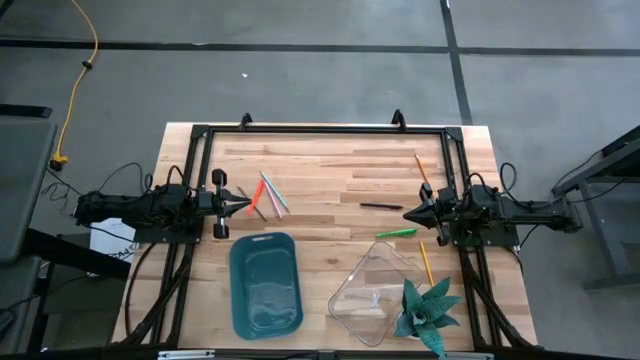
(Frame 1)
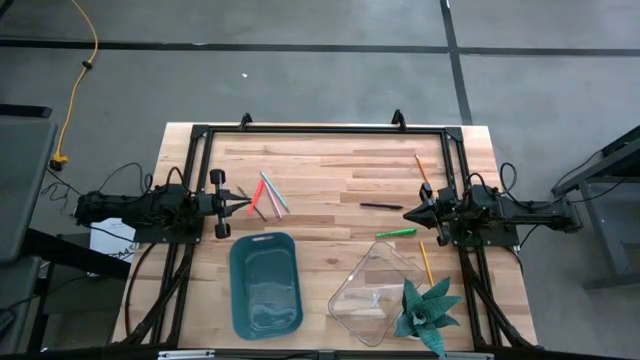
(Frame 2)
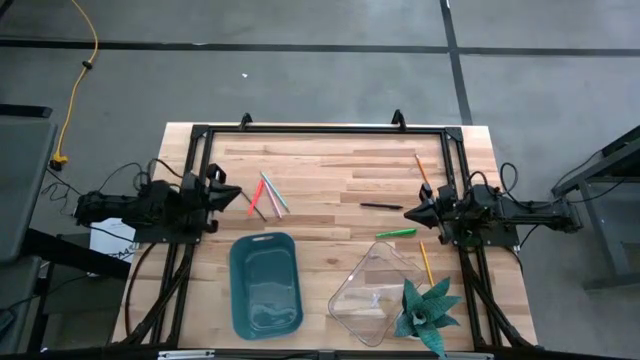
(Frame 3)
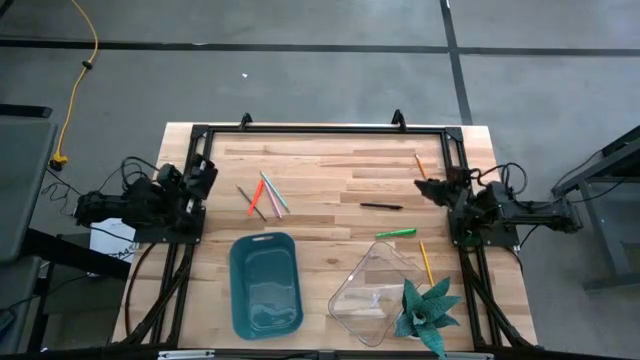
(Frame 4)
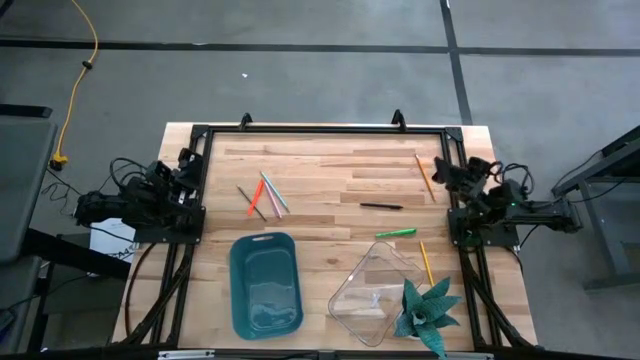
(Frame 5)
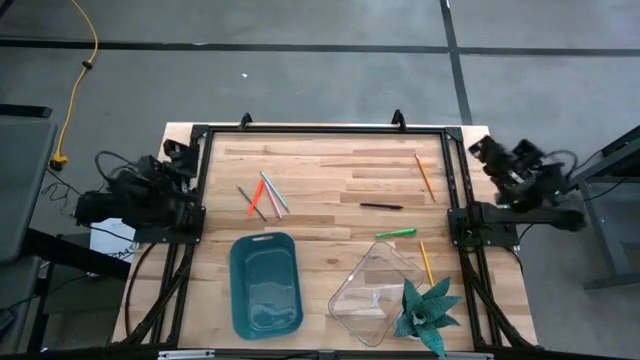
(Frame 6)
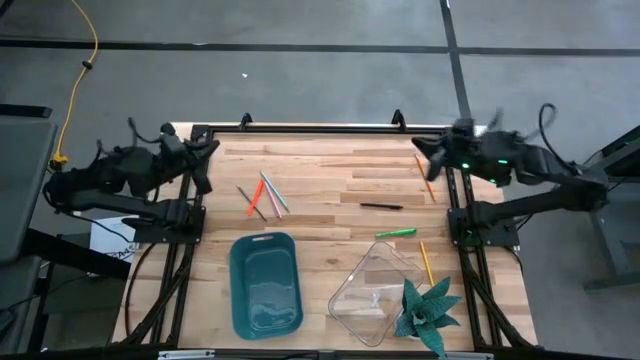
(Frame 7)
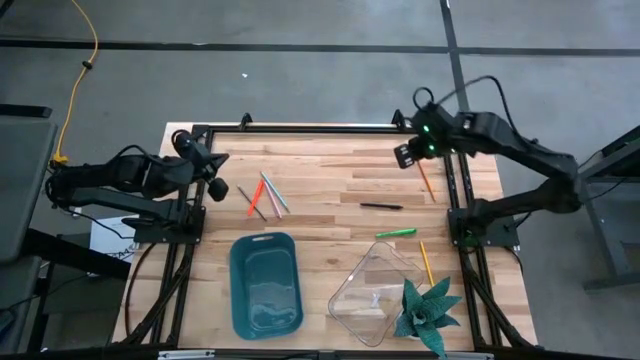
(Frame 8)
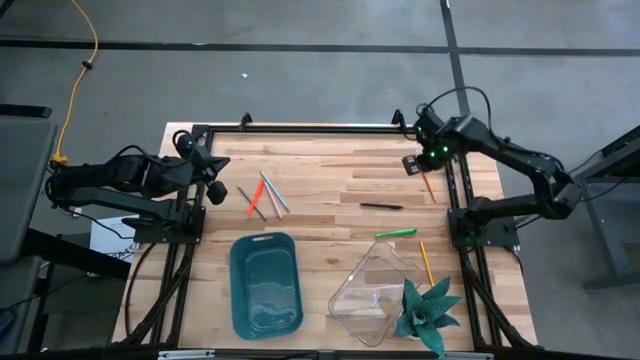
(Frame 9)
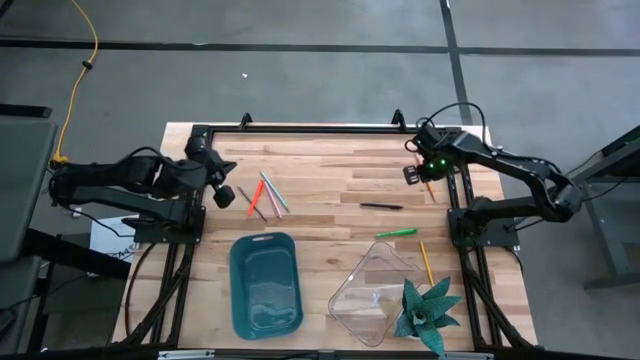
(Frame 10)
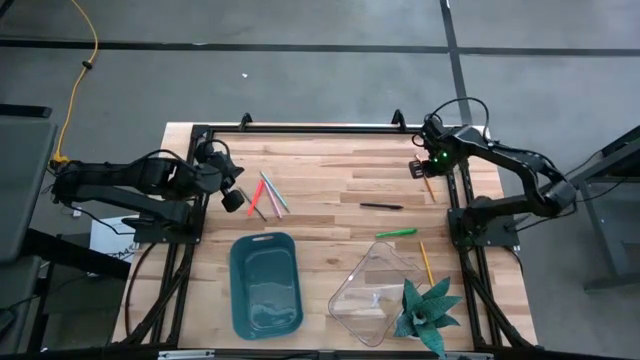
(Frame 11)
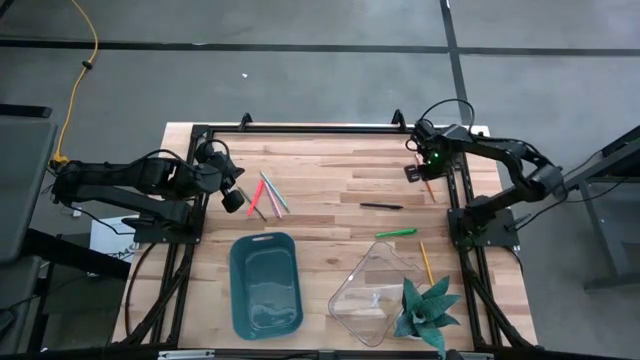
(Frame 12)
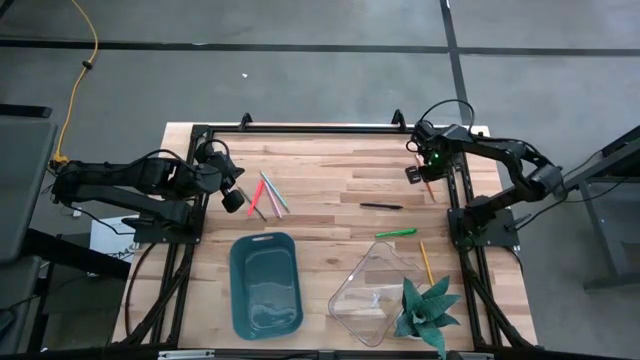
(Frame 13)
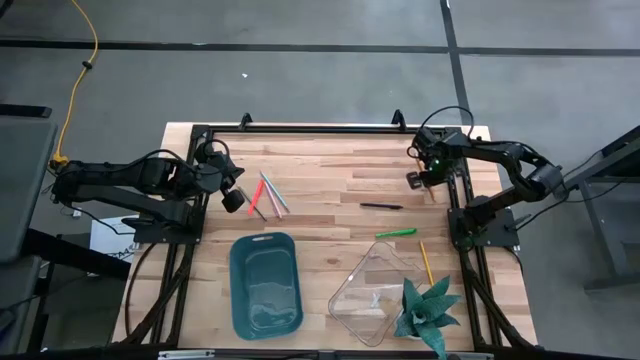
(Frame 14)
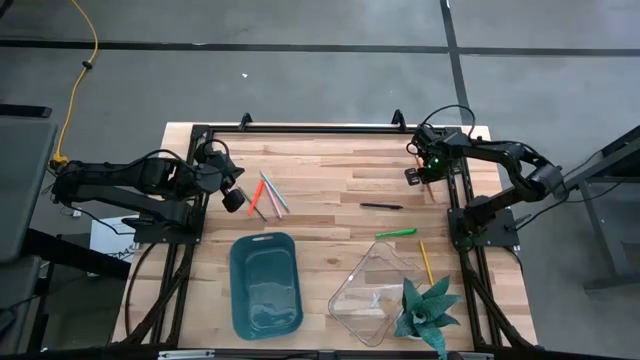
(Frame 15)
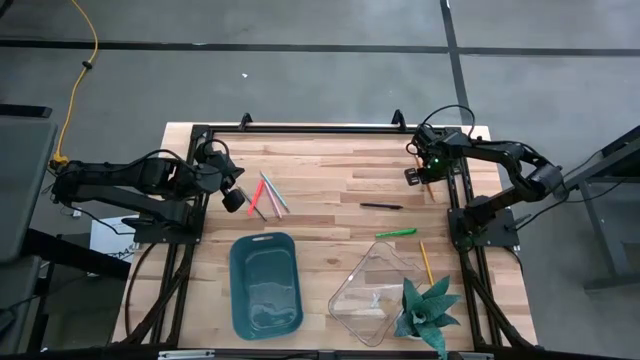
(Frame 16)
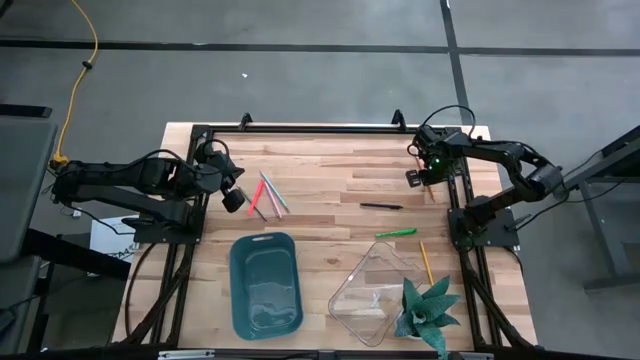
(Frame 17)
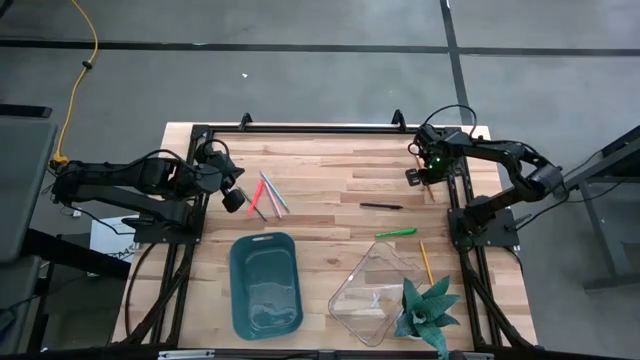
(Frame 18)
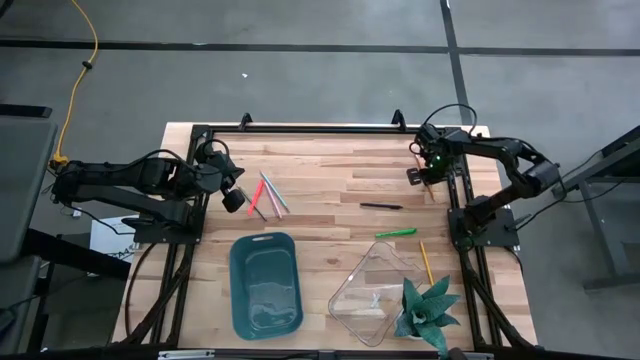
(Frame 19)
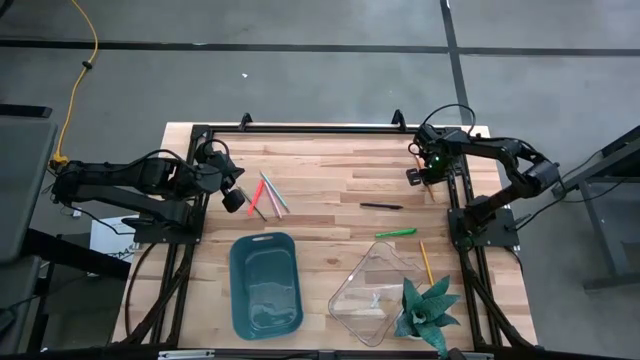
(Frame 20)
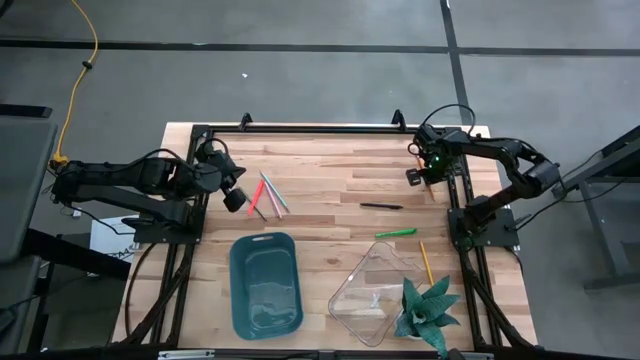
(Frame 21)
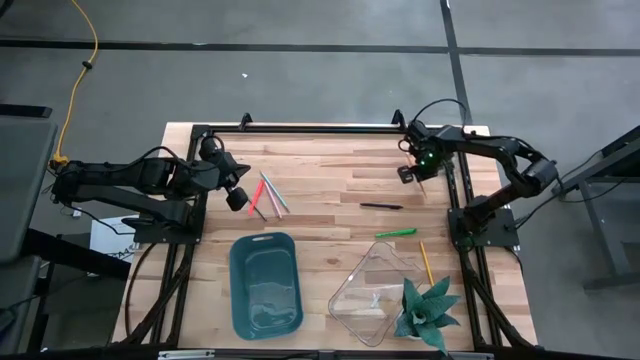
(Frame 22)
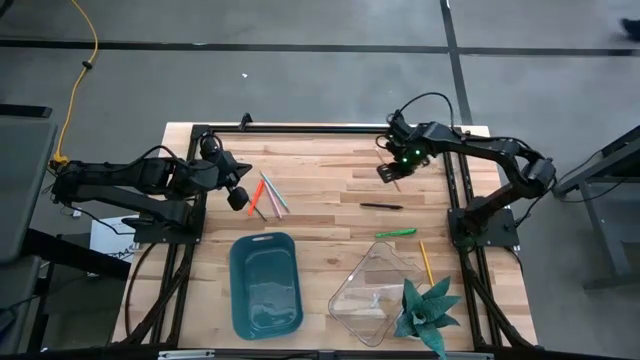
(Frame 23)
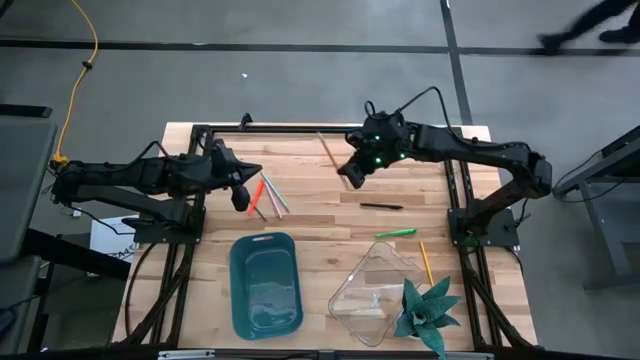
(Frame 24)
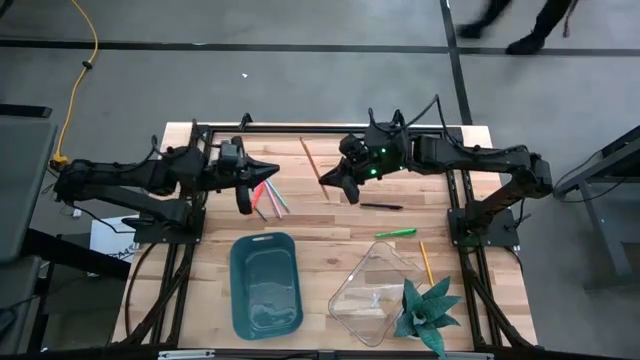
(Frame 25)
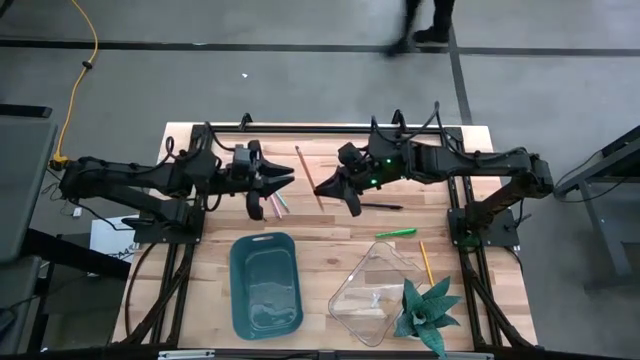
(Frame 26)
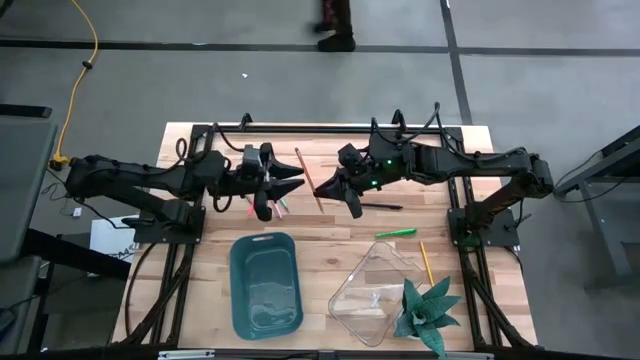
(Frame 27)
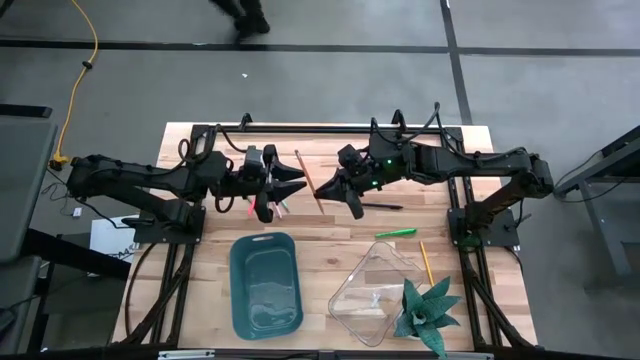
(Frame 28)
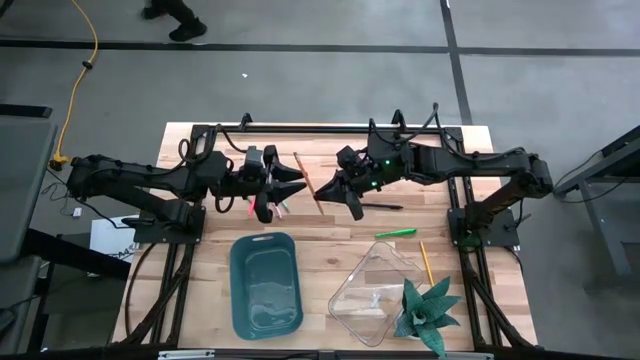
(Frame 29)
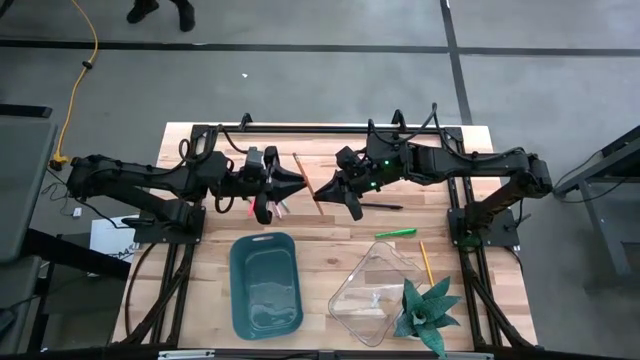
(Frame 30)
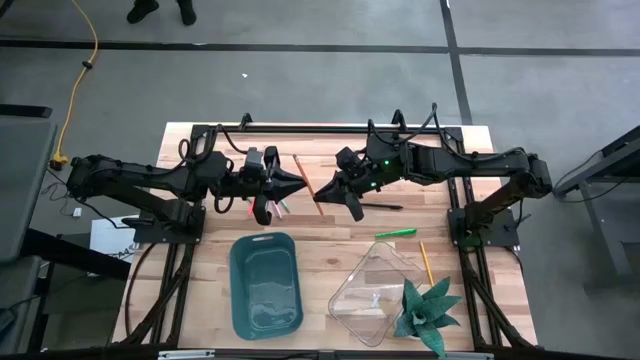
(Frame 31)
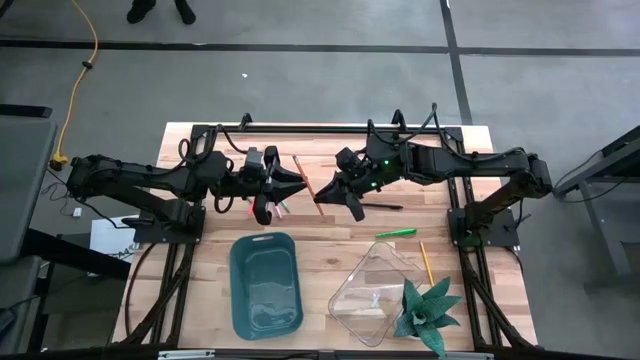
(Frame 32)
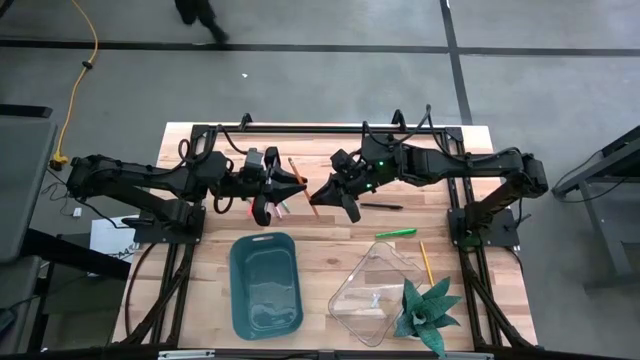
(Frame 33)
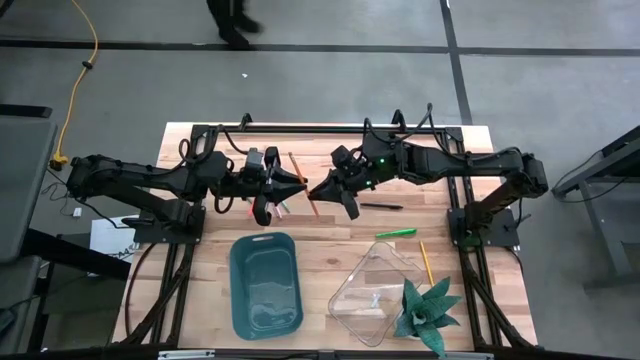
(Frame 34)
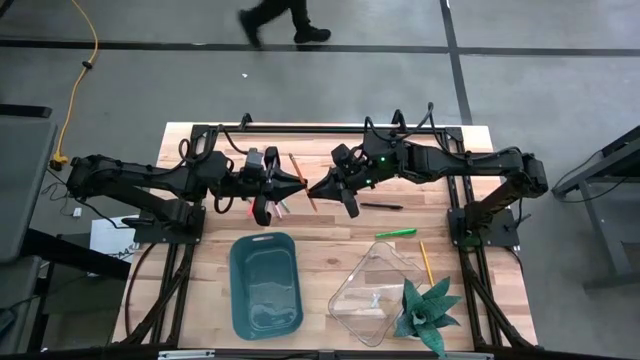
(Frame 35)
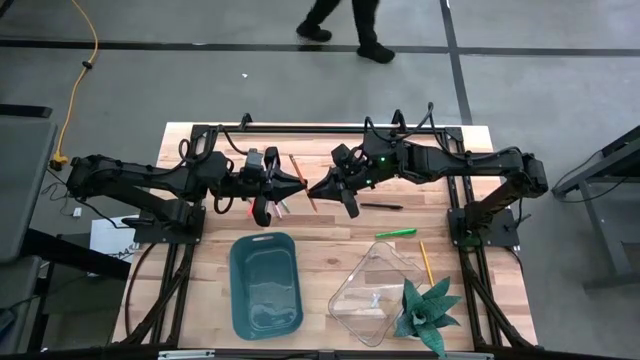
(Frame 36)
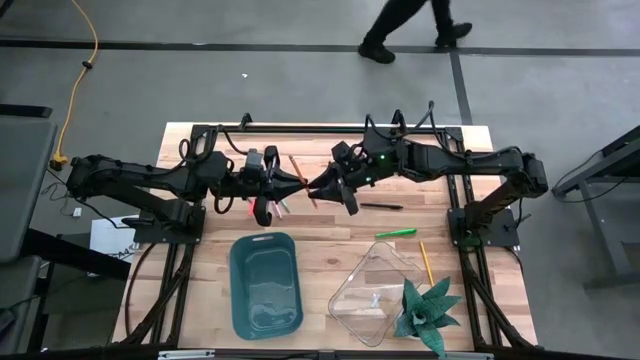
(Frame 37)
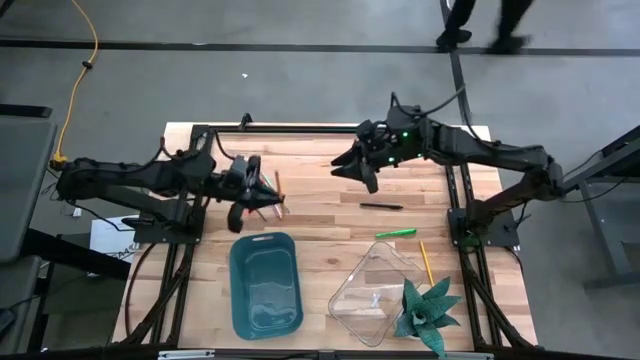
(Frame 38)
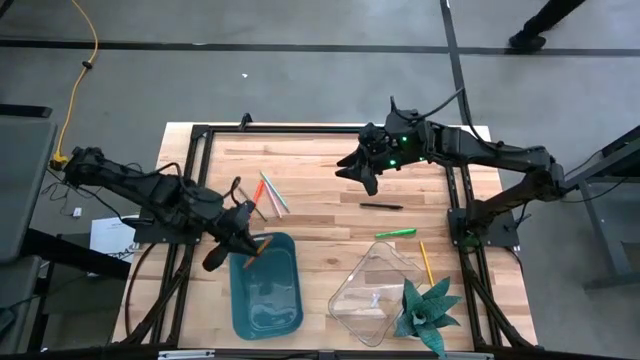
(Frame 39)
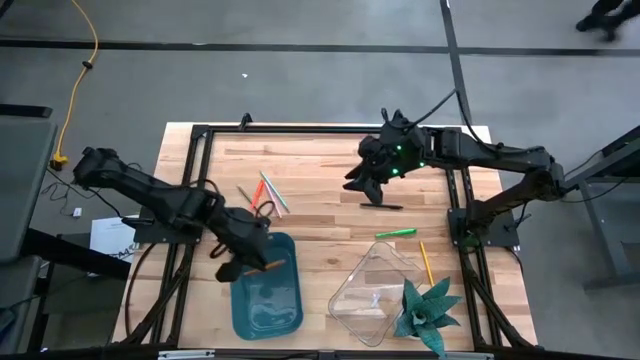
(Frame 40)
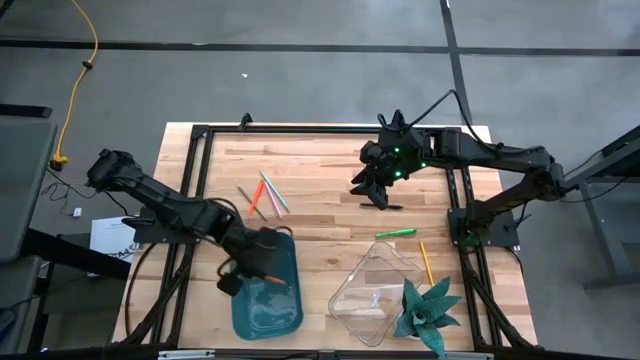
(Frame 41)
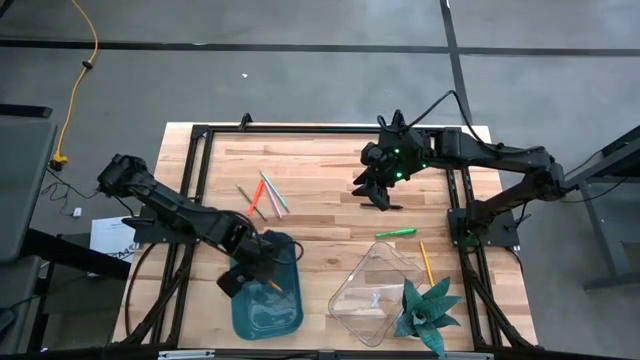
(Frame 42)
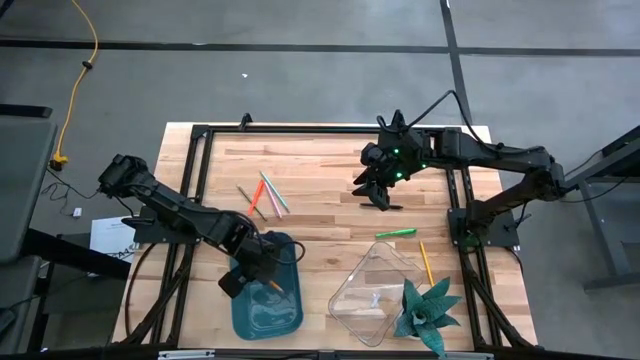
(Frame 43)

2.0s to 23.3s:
Task: Sort pens & pencils
Put the dark orange pencil into the blue bin
